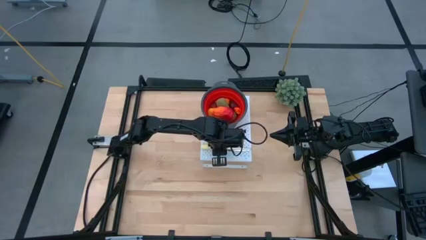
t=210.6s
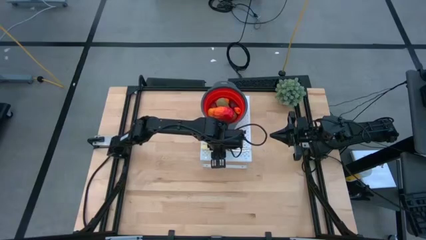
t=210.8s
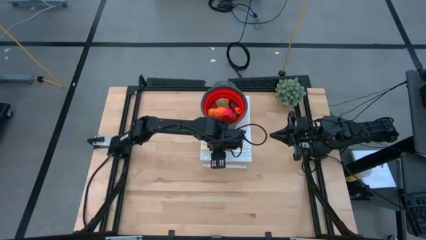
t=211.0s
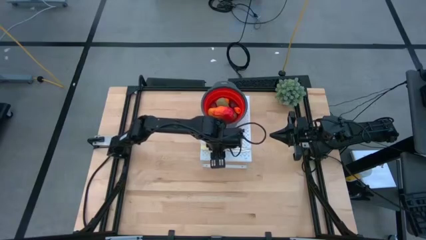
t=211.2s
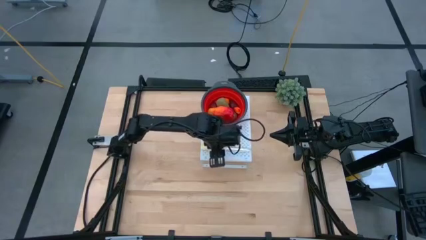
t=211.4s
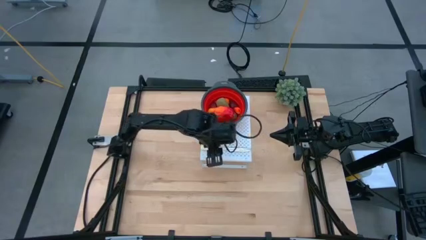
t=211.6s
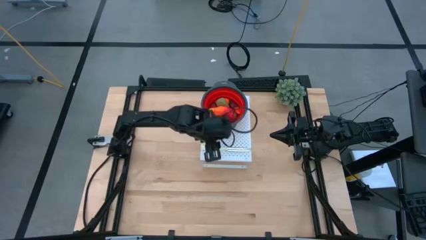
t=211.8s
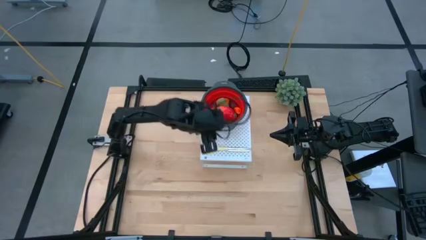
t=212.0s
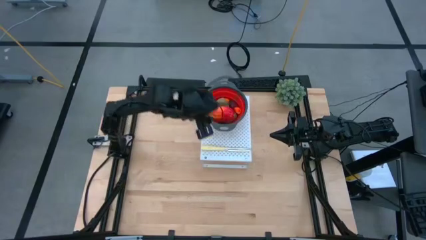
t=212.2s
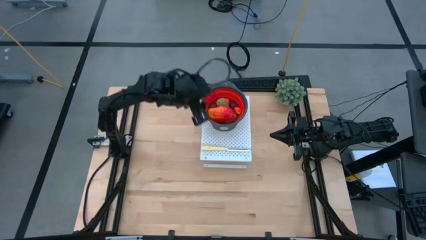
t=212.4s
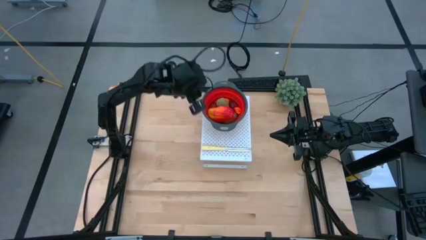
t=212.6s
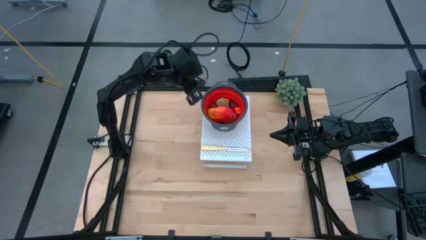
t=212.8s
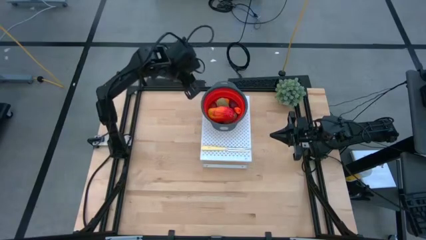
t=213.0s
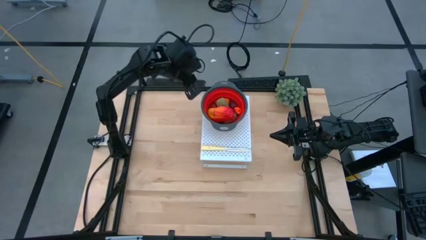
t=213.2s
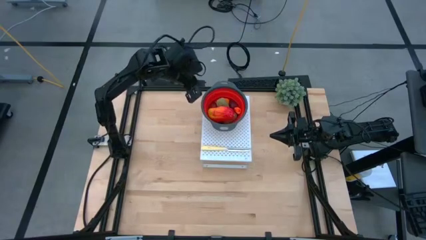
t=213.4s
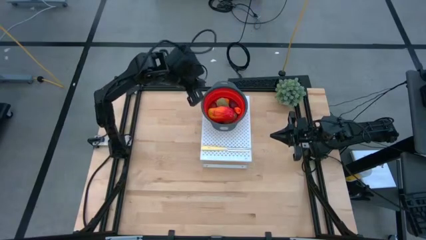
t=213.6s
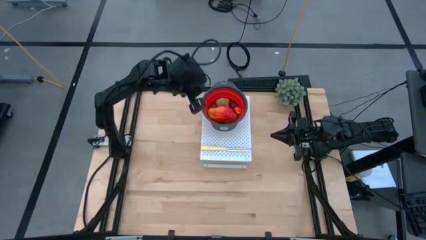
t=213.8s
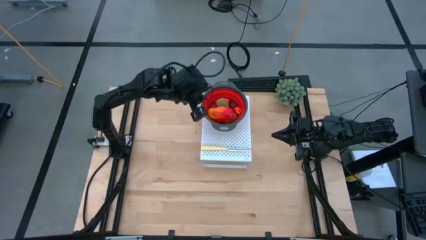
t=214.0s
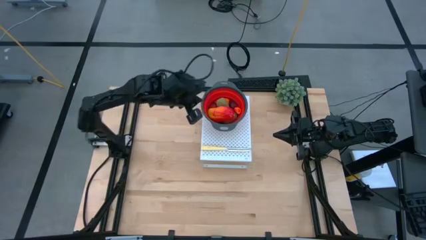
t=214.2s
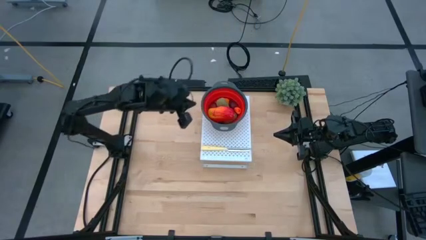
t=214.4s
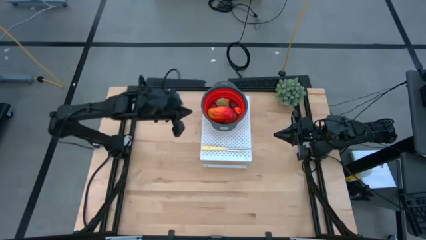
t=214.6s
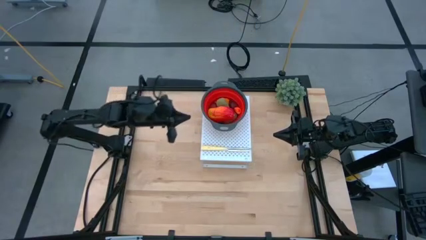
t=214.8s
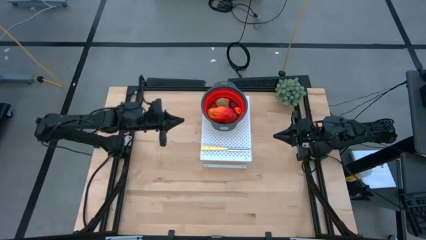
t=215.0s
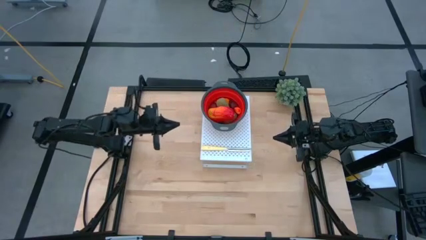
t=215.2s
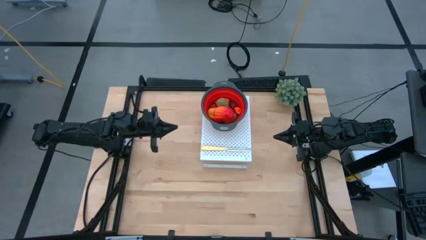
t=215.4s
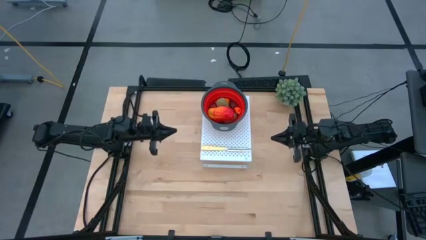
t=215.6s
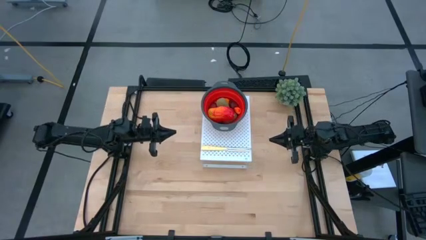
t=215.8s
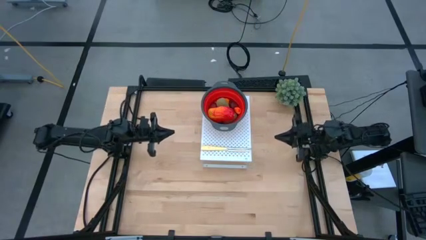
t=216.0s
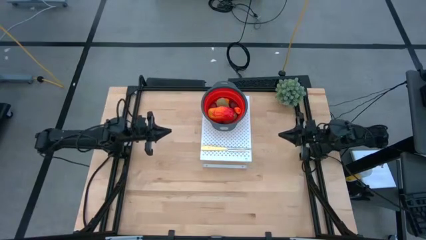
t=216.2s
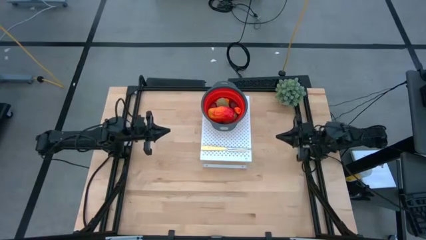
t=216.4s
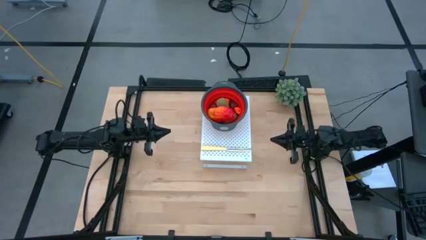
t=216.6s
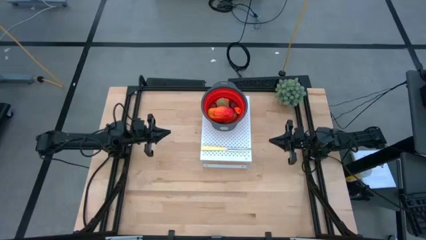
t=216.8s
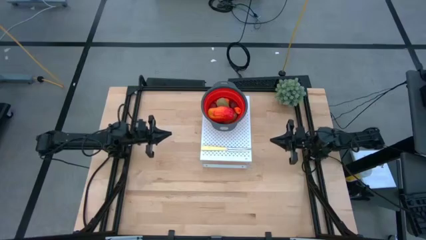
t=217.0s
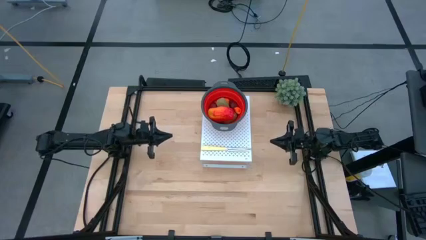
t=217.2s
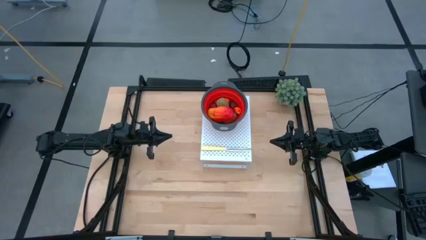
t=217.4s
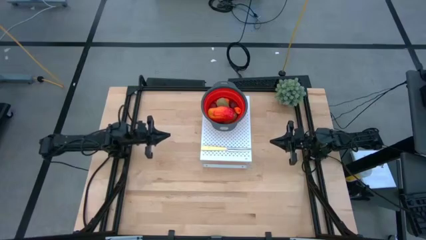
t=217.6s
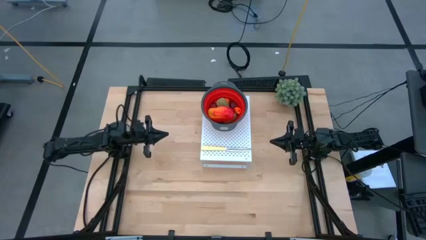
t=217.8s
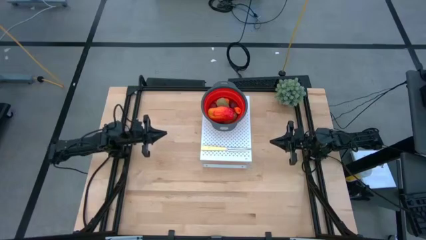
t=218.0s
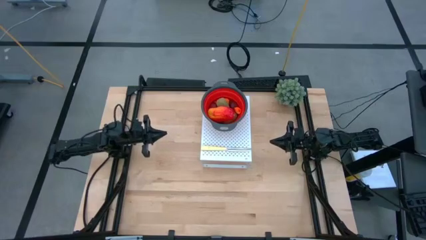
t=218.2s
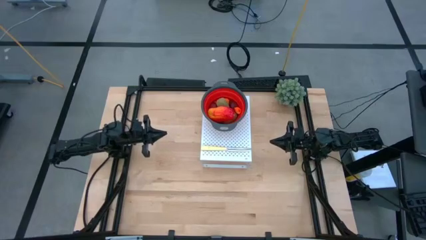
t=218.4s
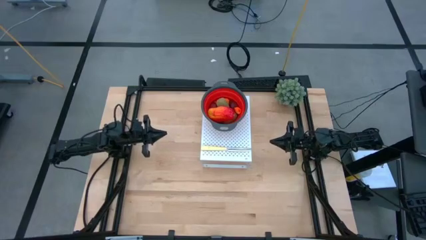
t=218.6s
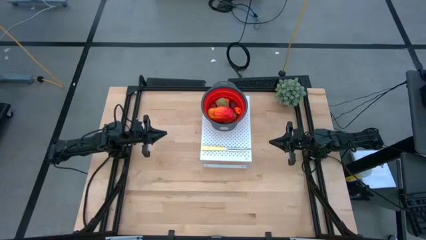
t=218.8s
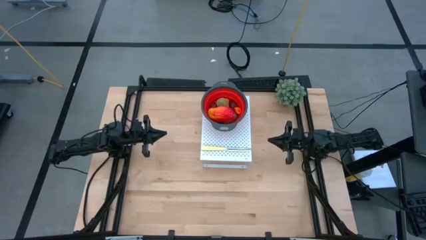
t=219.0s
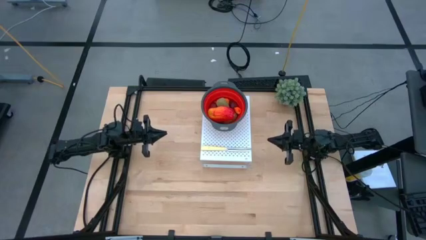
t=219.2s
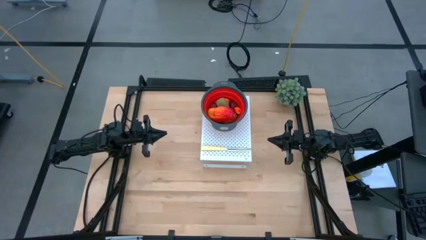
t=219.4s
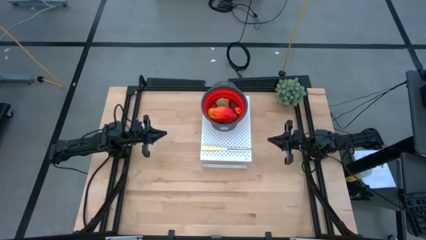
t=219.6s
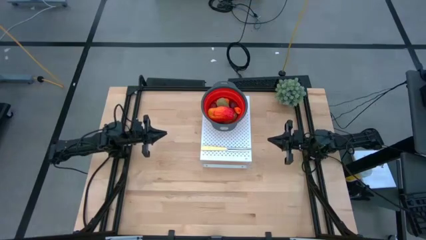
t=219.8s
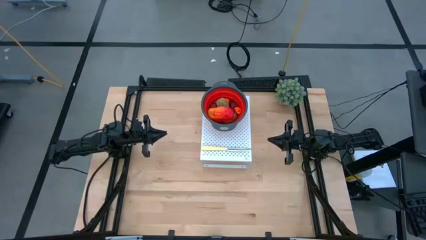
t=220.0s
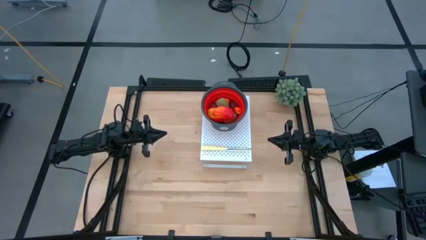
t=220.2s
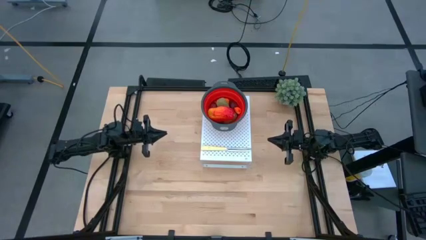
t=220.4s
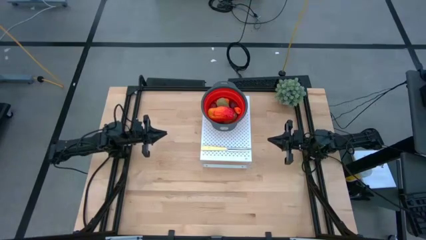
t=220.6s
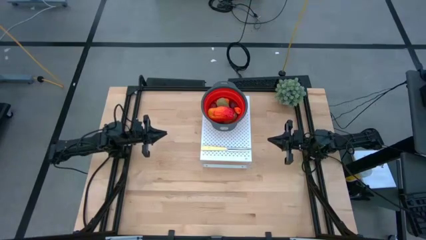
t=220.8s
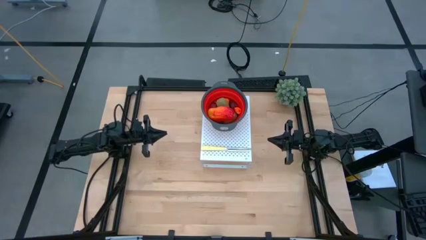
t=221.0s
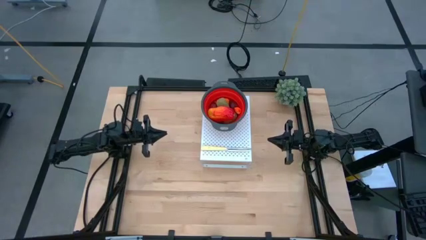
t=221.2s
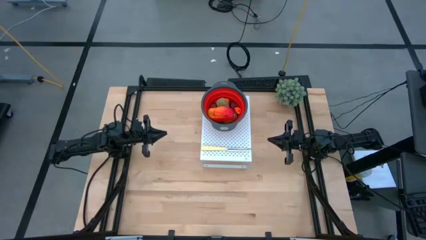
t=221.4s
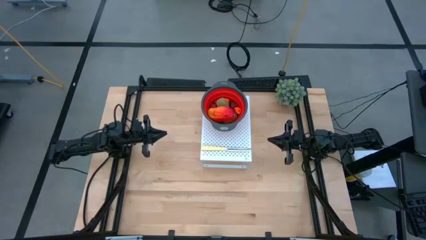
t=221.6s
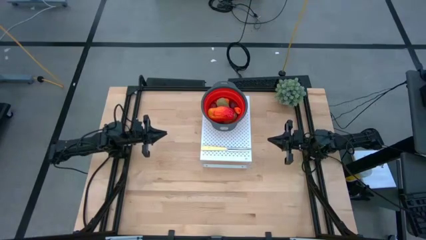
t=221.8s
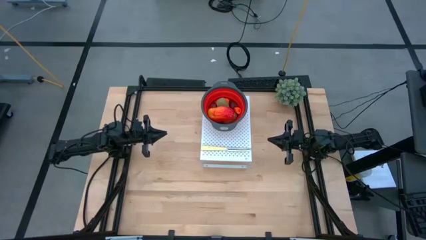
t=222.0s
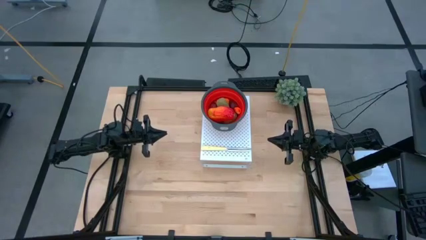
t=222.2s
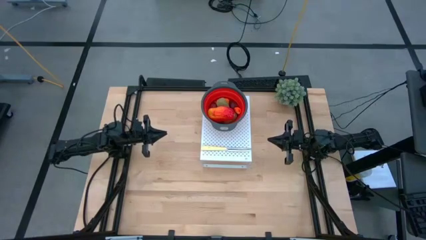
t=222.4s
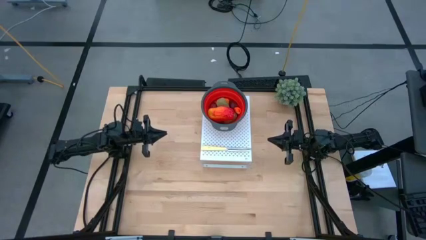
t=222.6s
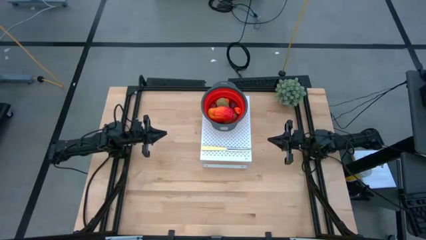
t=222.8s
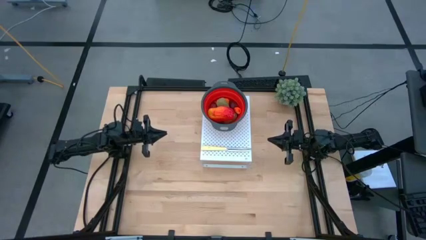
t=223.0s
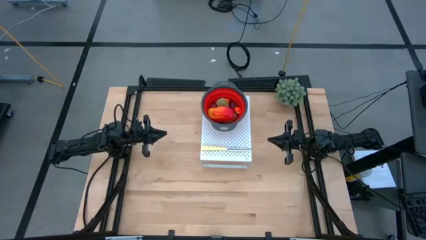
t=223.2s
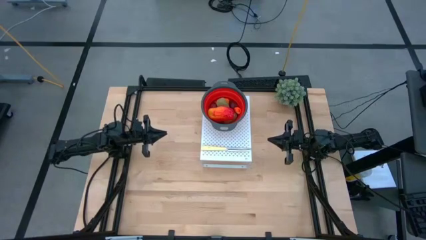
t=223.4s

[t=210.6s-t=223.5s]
Task: Pick & Place Fruit
Return to Home Position

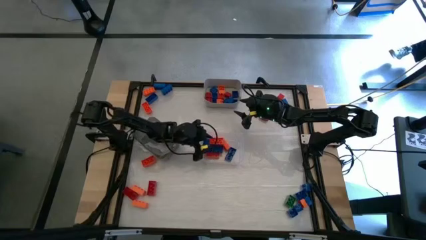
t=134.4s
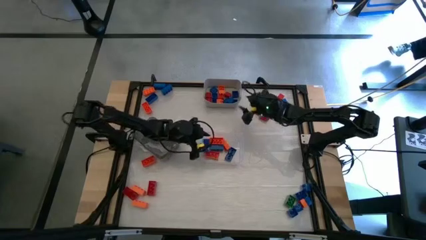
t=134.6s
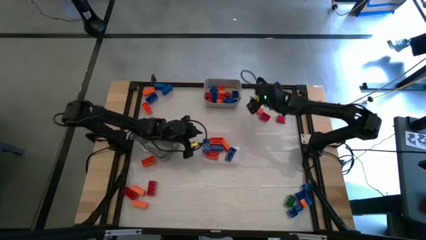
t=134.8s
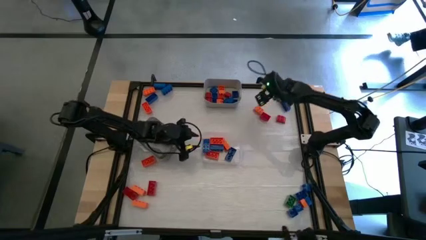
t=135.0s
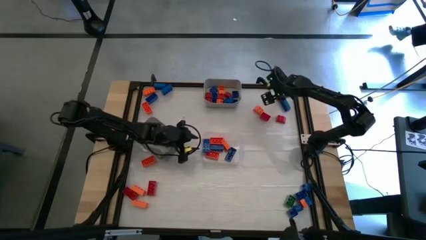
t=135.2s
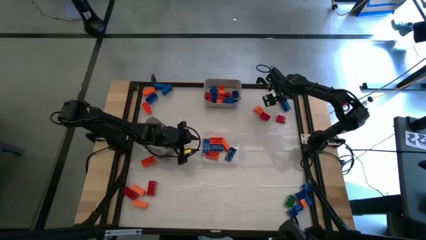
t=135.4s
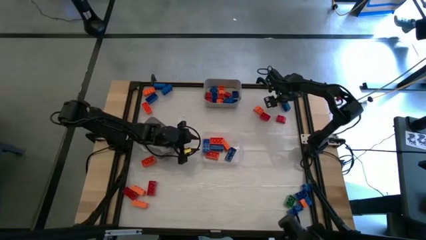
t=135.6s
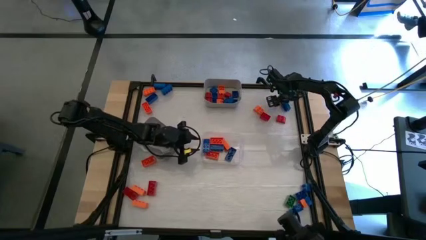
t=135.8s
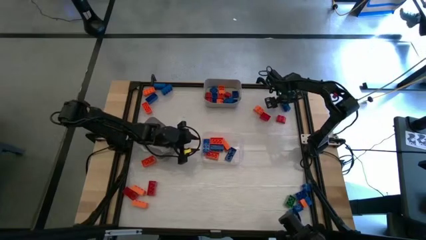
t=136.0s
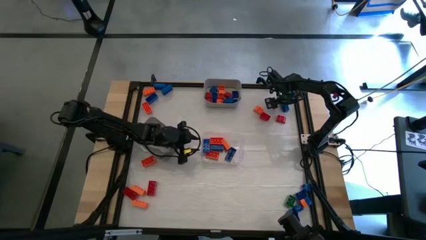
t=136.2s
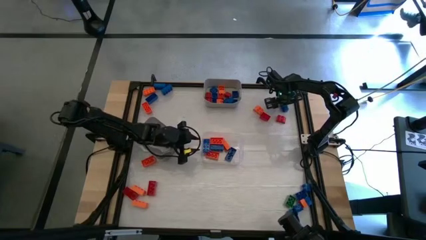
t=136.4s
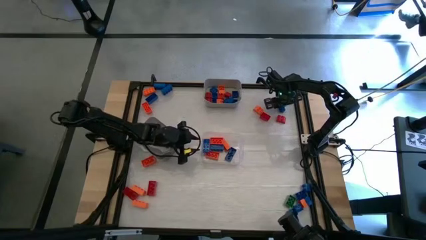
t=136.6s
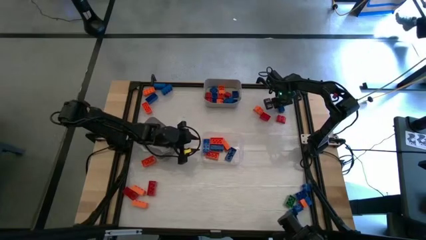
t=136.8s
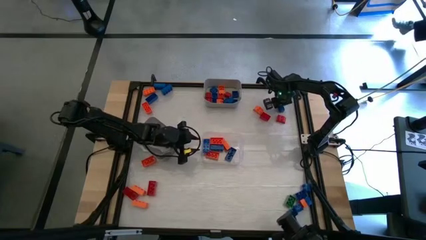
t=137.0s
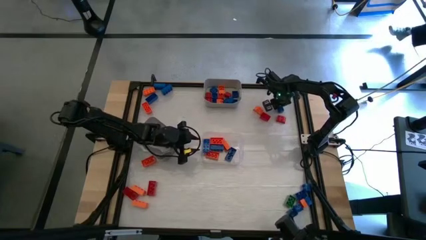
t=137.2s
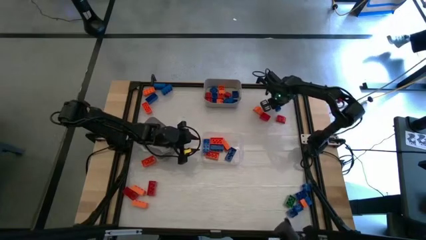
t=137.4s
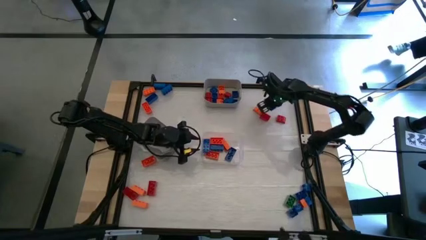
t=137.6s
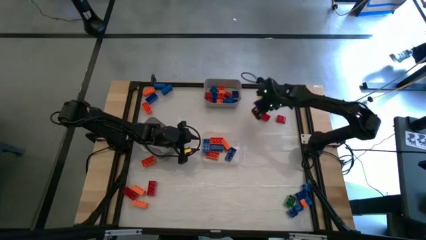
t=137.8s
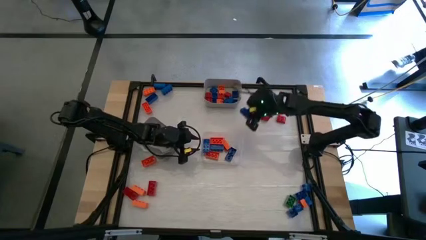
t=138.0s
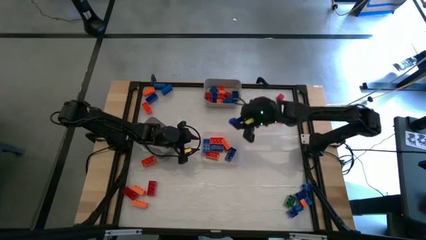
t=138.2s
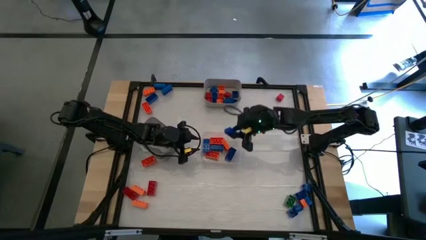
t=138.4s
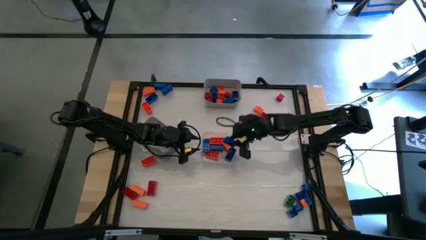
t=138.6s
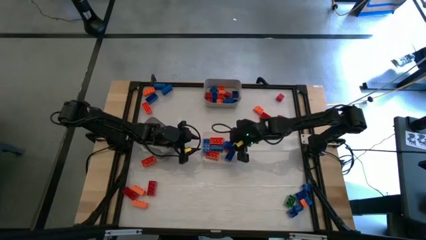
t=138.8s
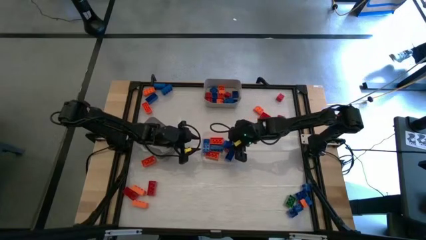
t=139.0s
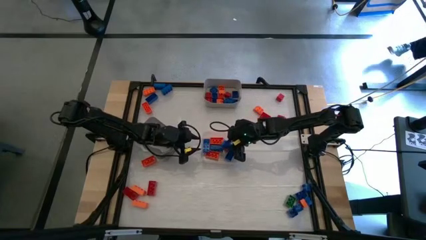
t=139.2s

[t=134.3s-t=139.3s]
Task: Sort blocks by size
Put the big blue game piece into the transparent bin
